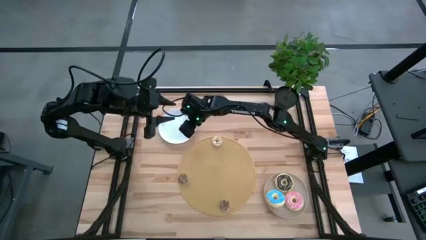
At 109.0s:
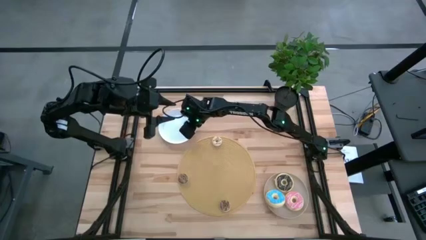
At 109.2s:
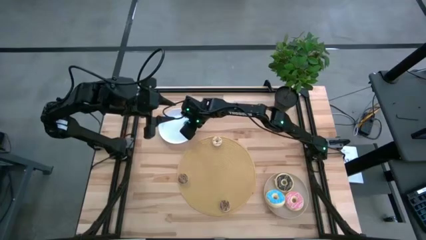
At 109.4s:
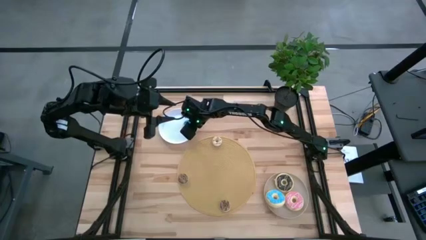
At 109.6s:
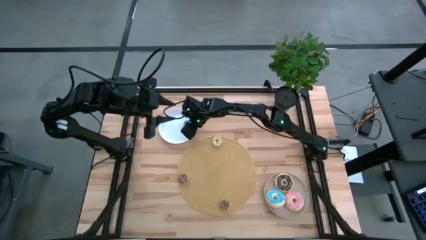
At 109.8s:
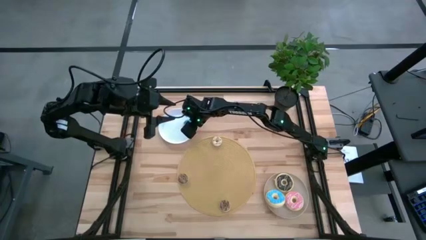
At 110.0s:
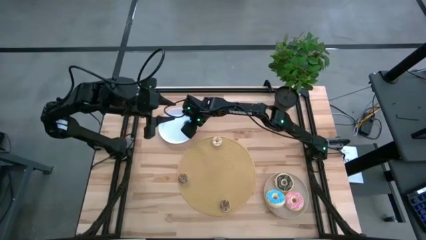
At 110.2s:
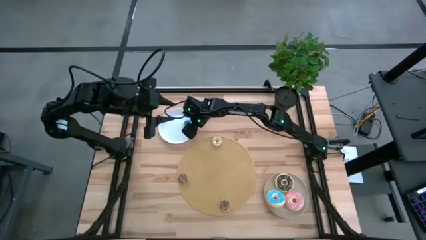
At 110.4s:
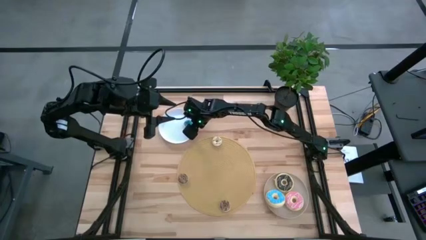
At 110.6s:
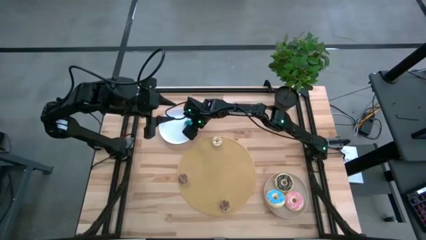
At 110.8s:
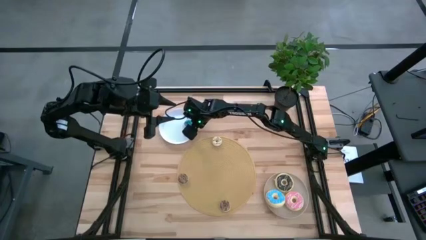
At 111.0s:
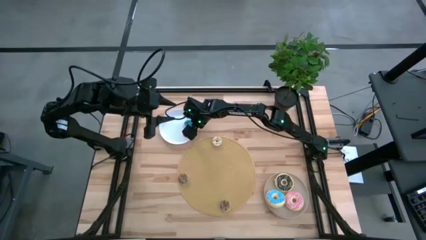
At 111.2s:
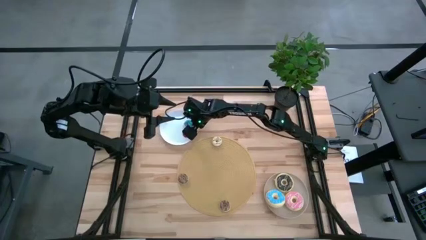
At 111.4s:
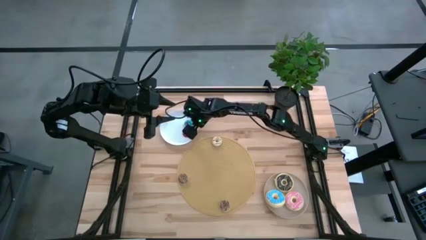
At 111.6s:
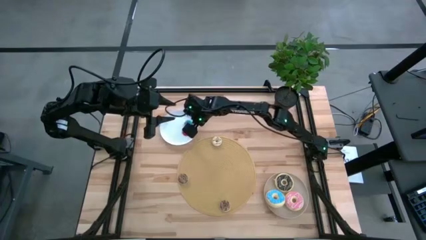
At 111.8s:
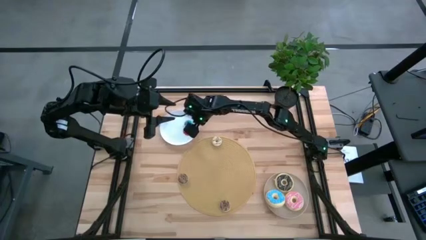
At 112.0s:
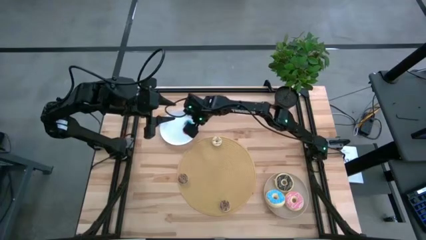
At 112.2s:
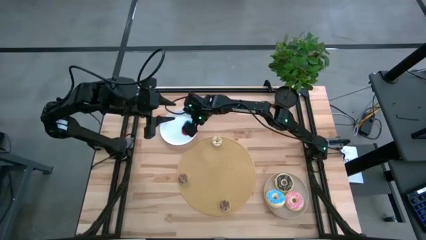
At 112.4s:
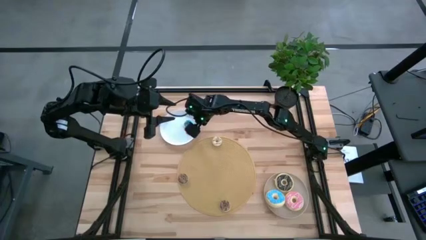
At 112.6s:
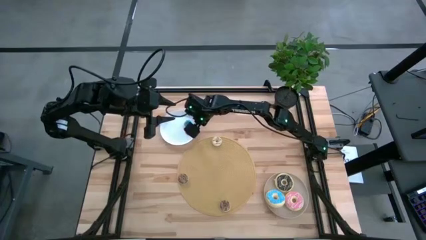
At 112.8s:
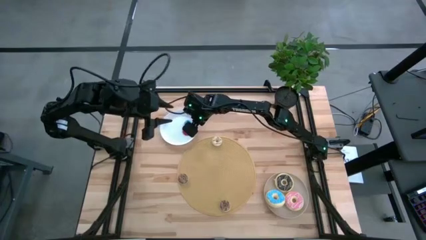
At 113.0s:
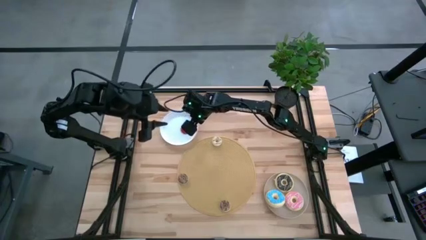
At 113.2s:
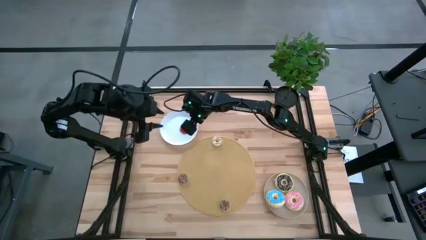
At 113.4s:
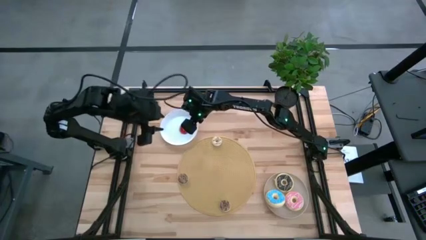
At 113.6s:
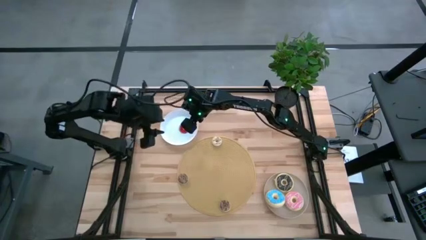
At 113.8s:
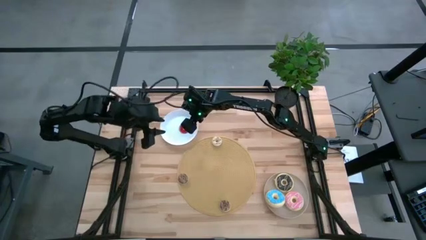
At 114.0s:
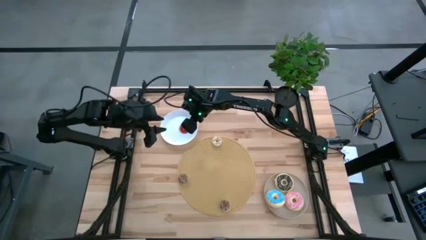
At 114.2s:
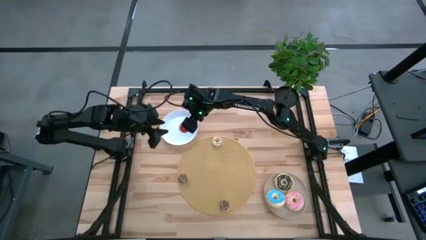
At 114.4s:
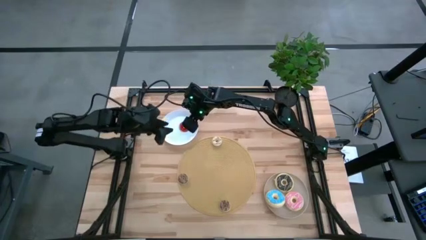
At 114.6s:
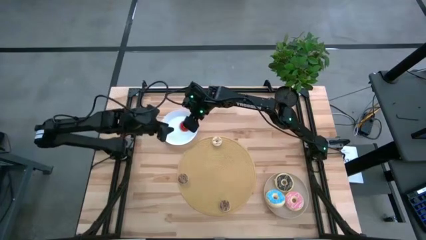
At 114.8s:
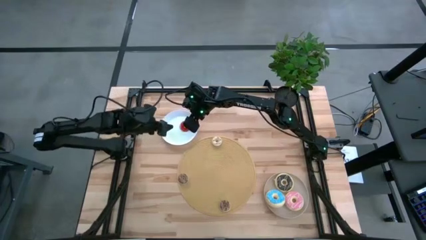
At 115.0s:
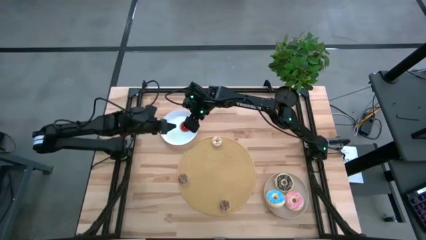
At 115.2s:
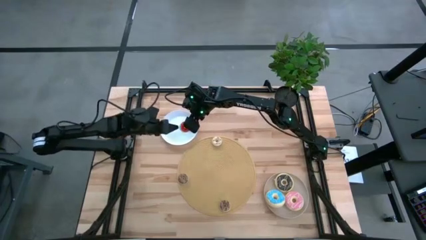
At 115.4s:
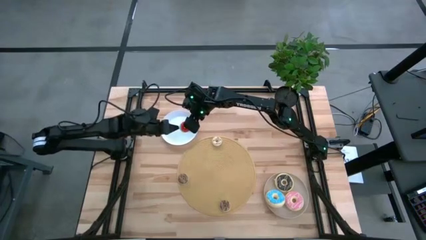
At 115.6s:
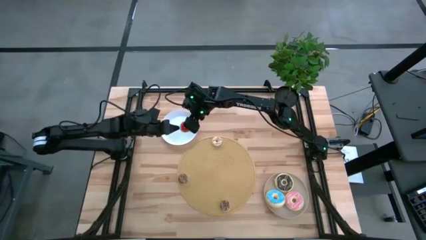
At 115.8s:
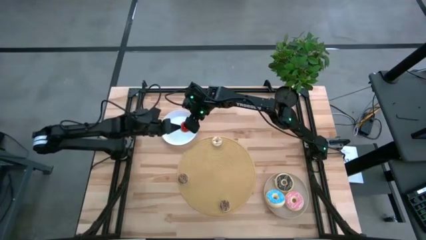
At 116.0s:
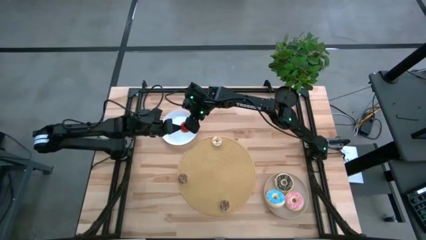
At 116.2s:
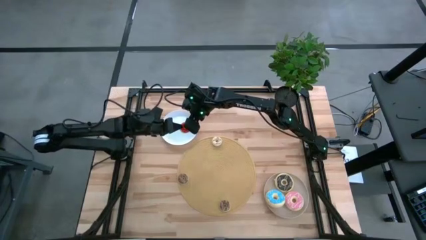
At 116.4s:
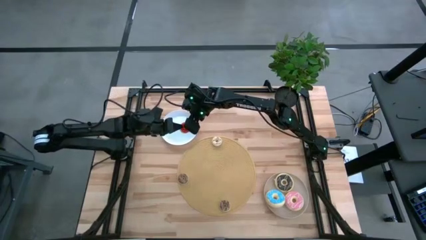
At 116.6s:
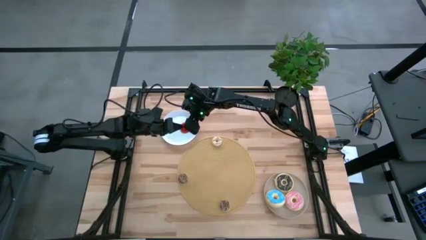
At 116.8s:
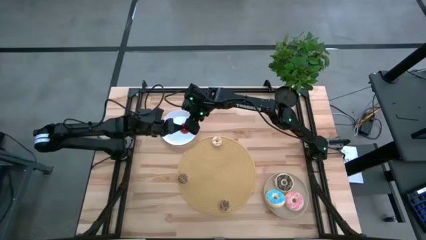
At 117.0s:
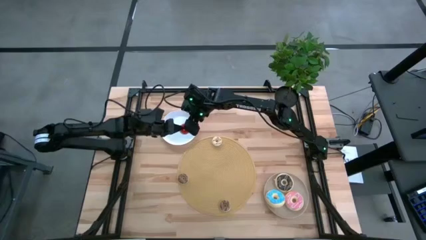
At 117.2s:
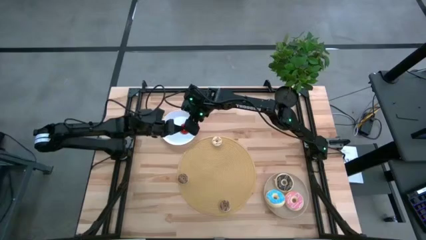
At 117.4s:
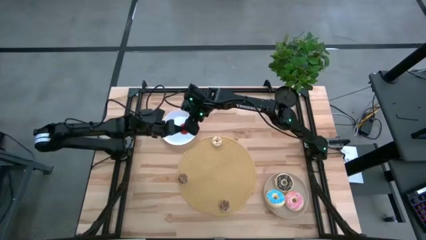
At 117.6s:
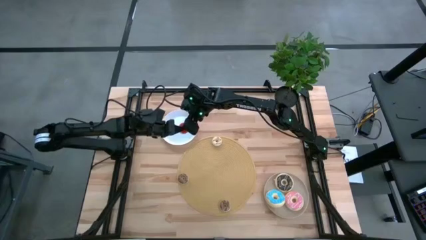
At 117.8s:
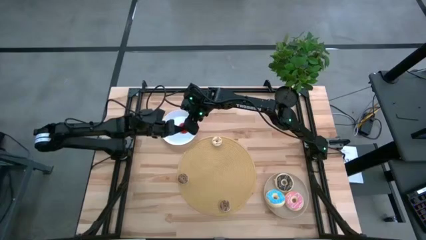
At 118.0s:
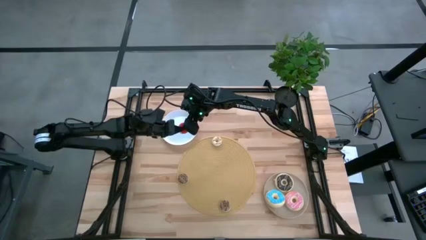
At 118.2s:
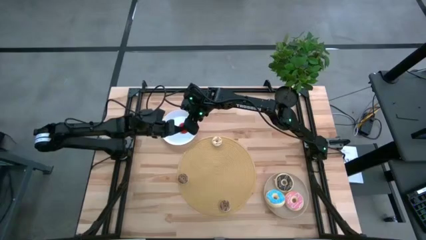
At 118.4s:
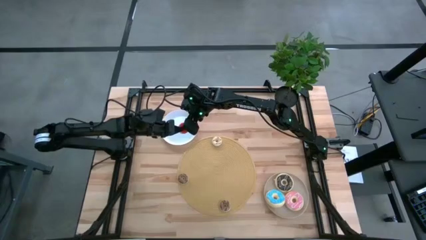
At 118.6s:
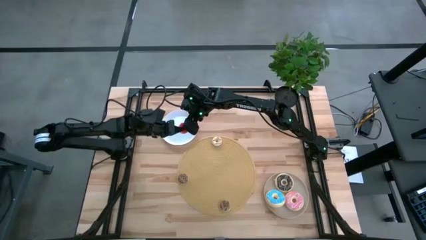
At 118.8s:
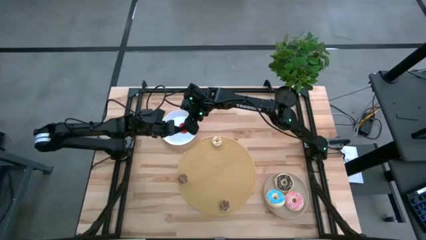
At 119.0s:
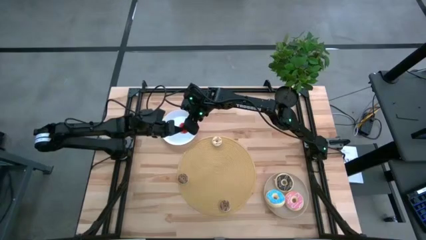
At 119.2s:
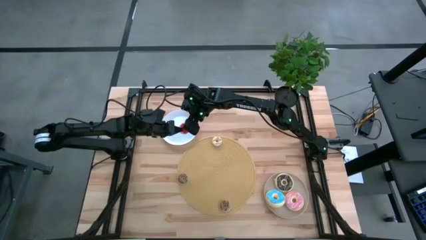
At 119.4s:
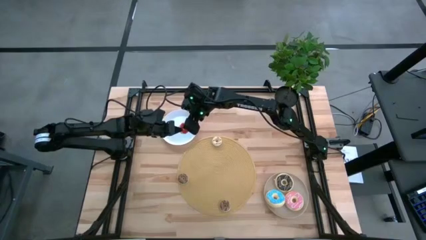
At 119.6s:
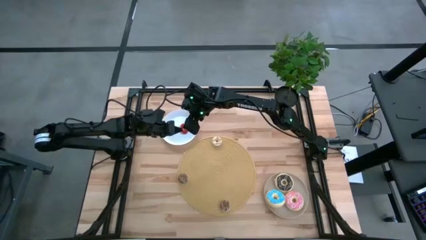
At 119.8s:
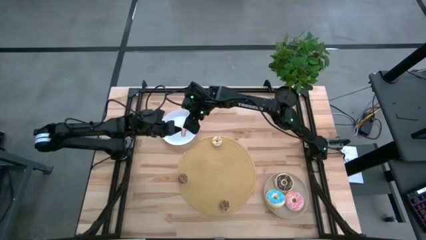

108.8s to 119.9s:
Task: Pick & Place donuts
Put the small red donut into the white plate
